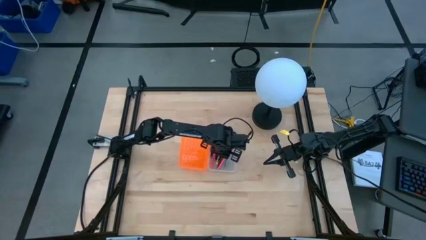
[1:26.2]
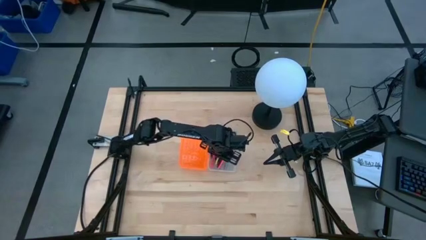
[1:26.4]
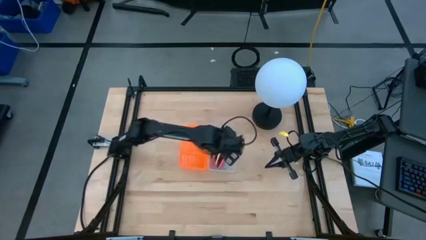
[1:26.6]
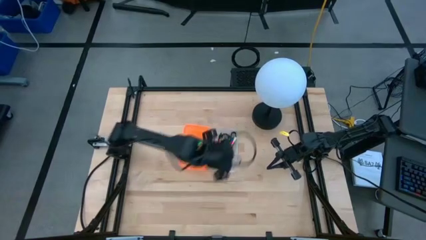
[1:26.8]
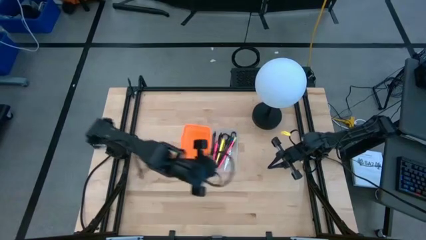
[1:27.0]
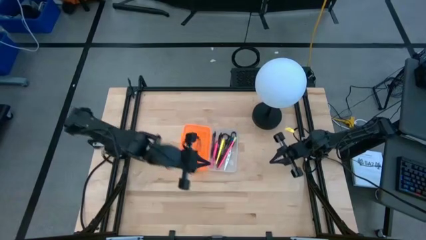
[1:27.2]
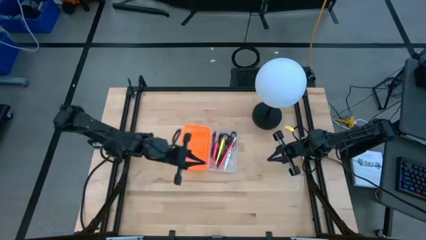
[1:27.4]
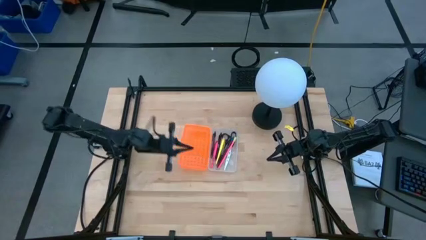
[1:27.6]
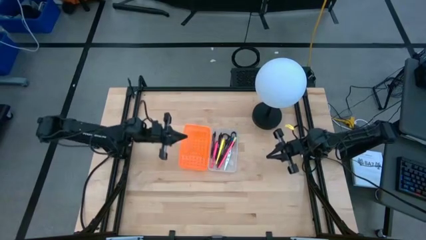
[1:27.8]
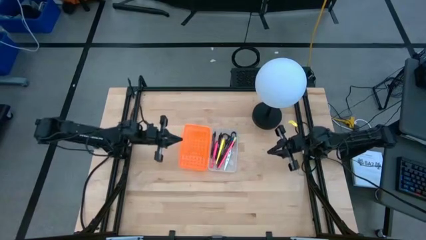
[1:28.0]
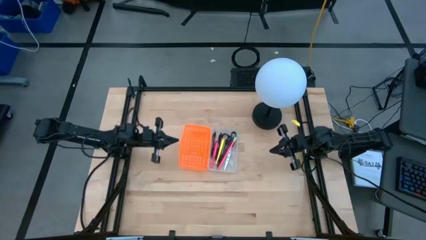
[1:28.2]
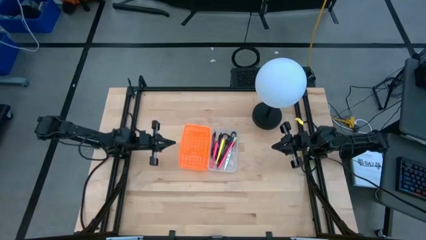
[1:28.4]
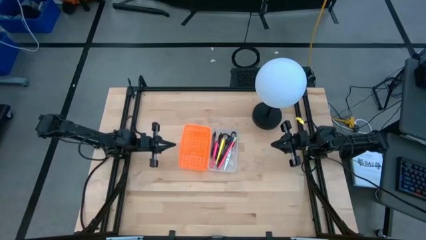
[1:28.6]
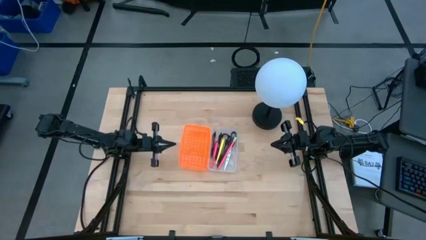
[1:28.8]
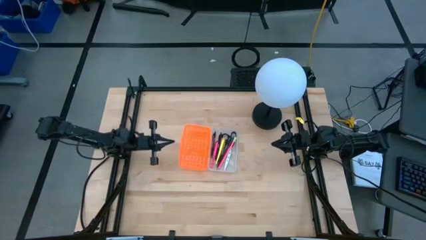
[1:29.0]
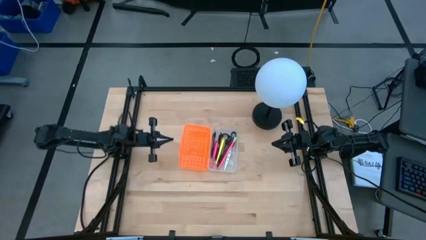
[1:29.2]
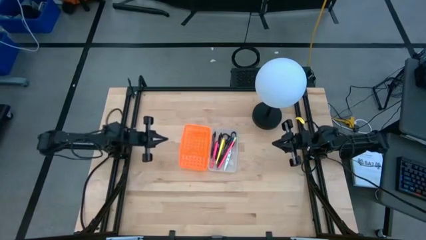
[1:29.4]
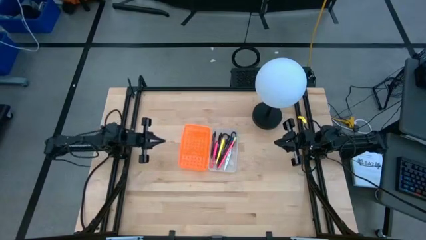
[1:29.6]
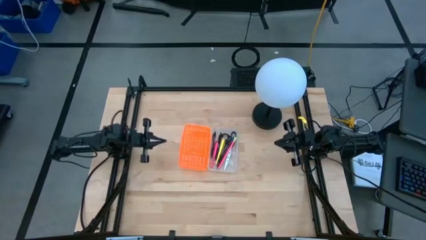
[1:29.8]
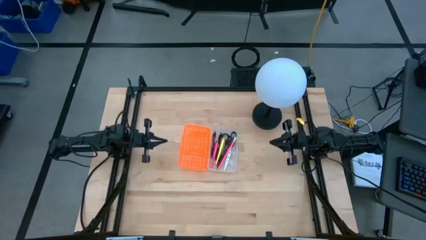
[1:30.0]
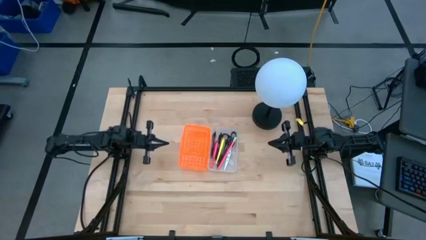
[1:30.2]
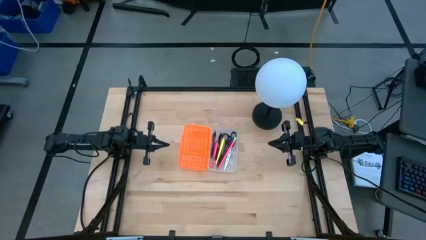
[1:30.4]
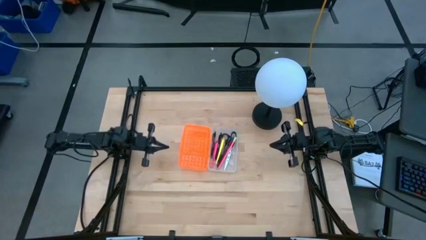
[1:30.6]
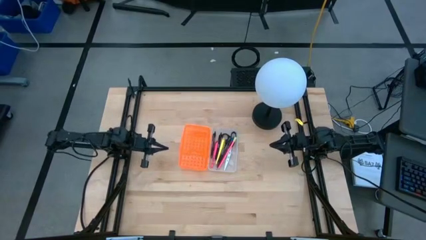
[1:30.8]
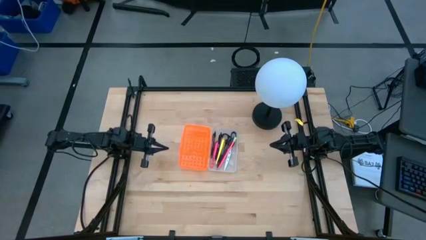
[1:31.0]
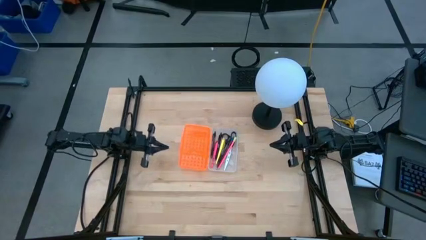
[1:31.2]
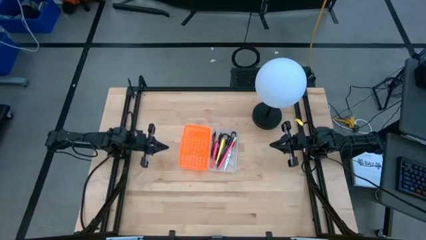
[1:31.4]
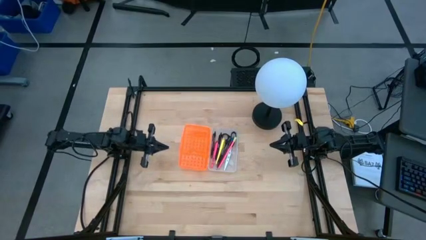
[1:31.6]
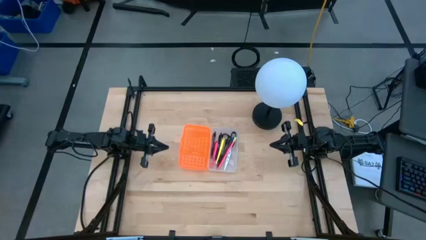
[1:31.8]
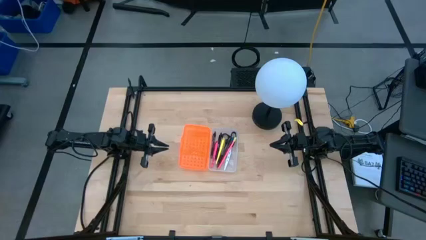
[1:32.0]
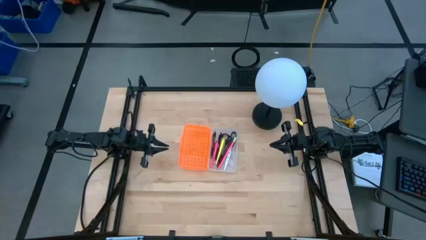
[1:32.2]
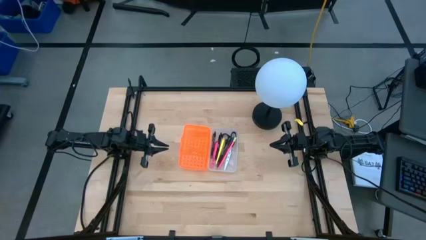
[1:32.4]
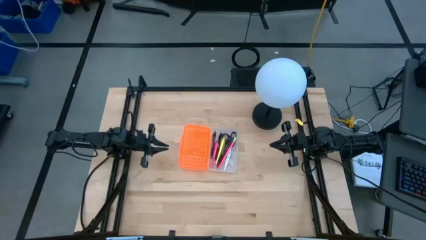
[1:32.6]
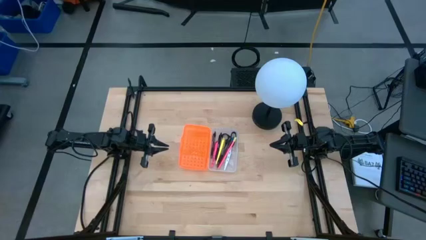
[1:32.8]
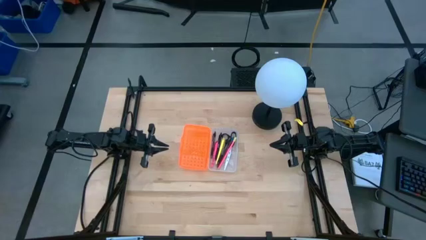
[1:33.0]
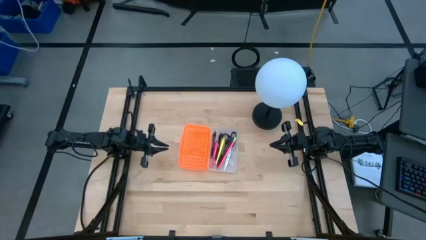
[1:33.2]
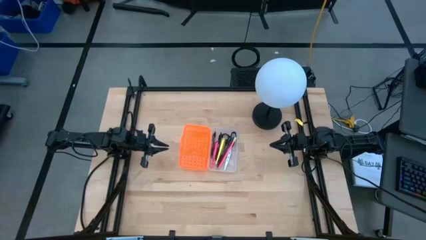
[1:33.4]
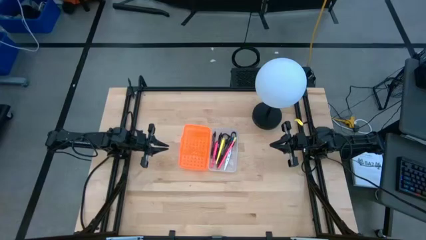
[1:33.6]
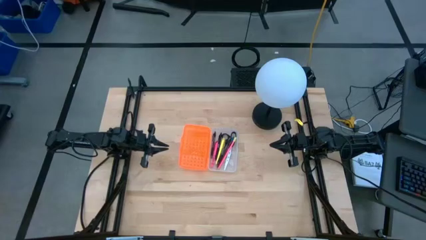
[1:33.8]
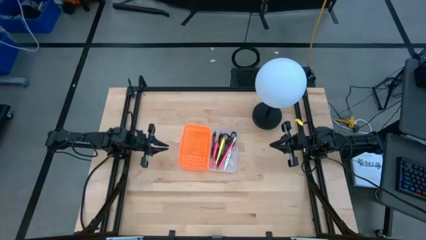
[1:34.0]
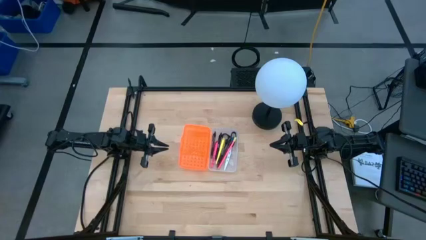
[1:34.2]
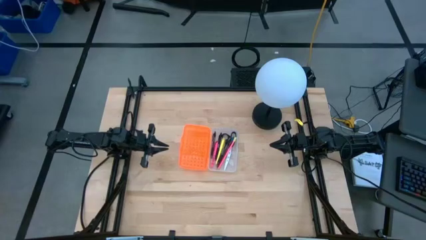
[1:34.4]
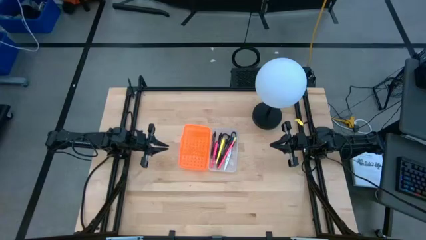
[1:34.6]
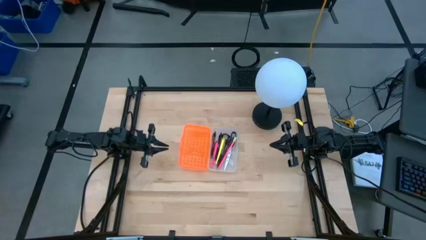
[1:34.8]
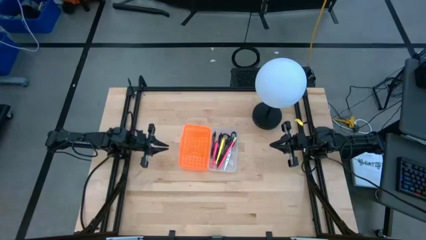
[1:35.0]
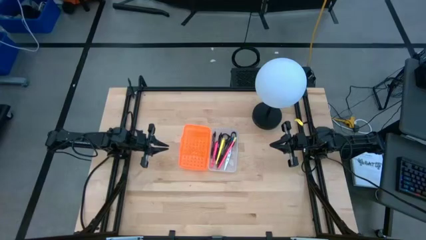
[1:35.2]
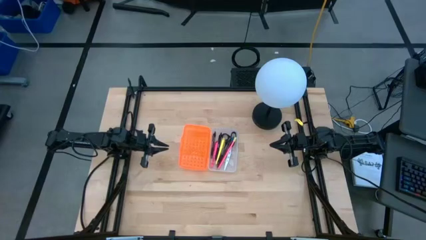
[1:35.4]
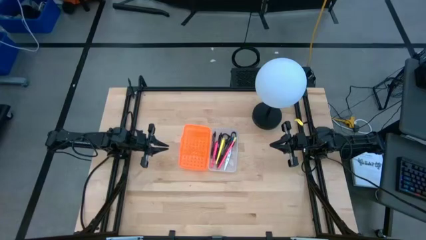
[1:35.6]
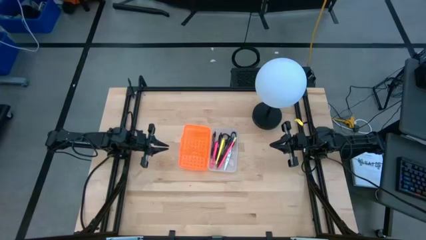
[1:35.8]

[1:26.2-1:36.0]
Task: Pick & place school supplies into a supply box
Return to Home Position

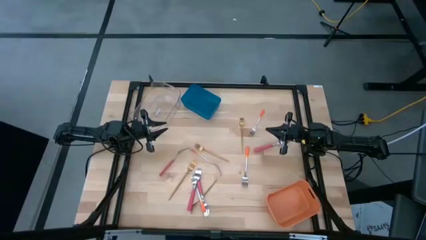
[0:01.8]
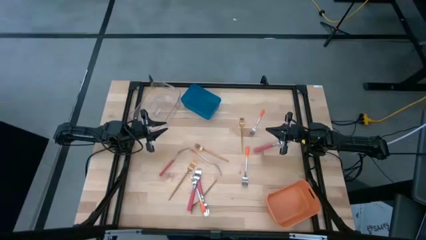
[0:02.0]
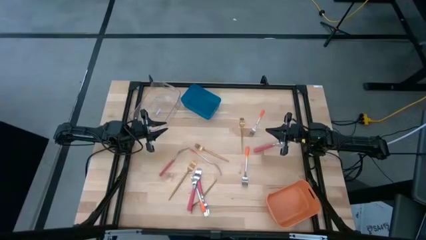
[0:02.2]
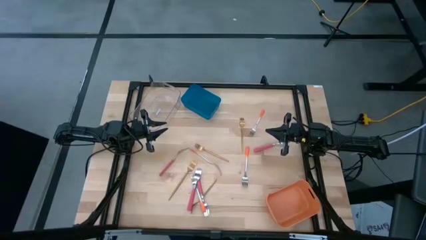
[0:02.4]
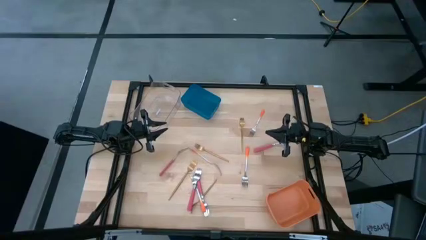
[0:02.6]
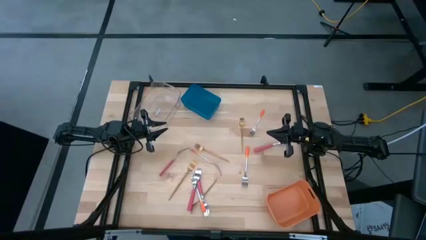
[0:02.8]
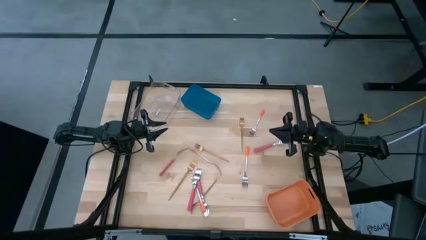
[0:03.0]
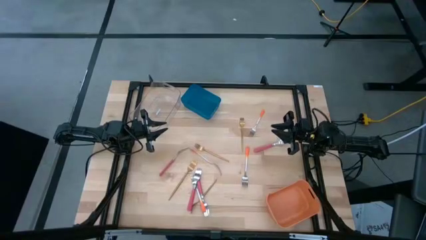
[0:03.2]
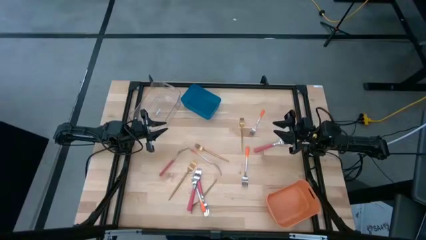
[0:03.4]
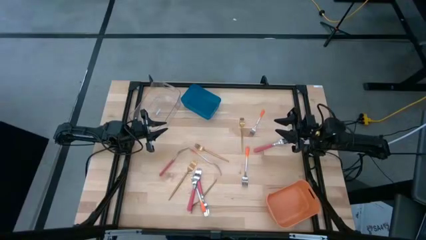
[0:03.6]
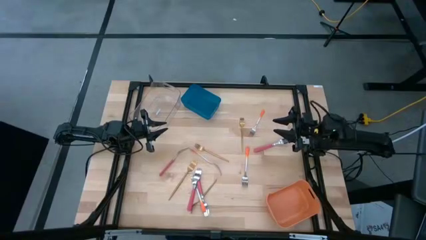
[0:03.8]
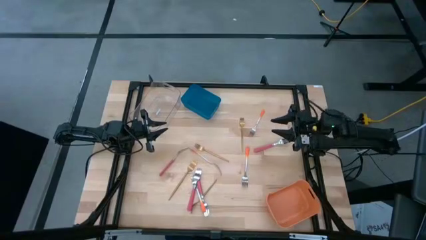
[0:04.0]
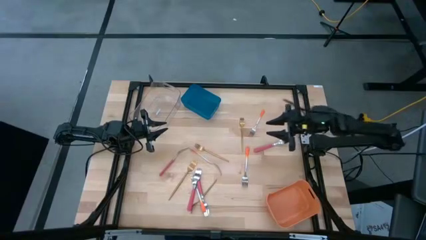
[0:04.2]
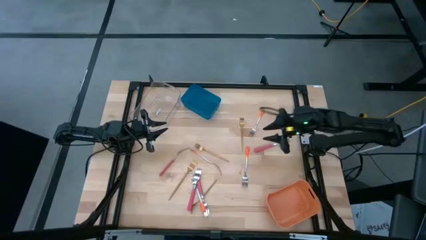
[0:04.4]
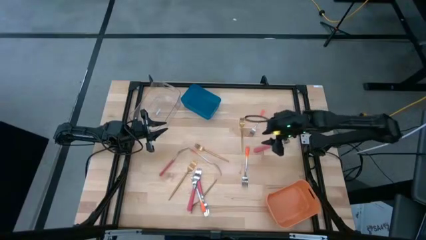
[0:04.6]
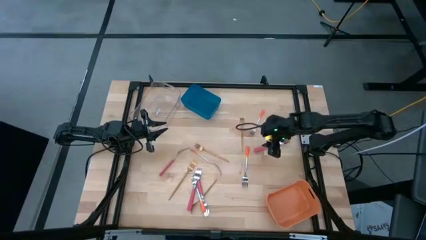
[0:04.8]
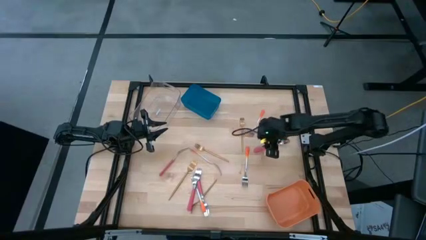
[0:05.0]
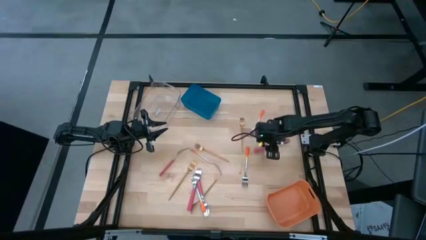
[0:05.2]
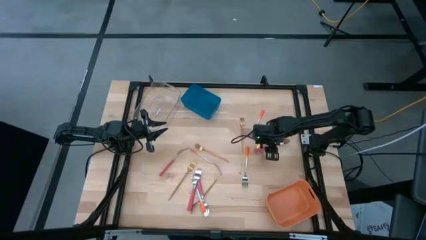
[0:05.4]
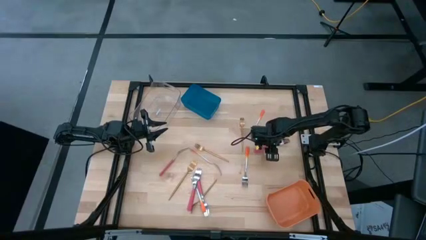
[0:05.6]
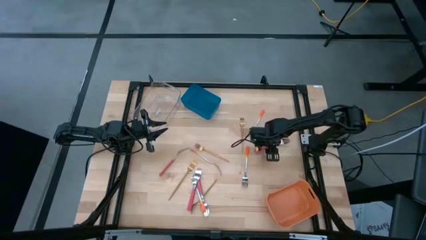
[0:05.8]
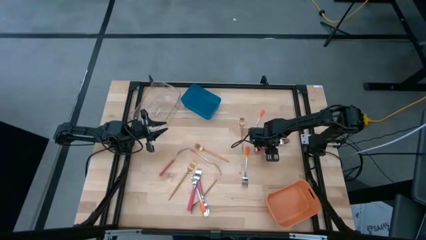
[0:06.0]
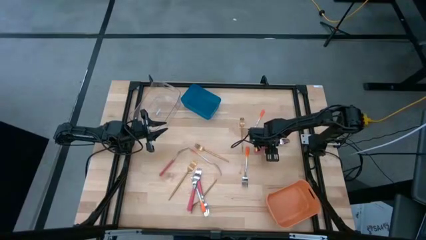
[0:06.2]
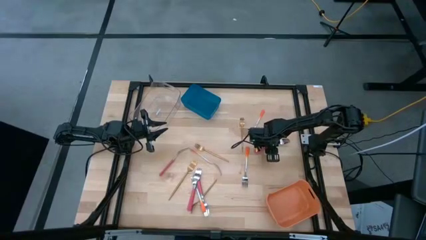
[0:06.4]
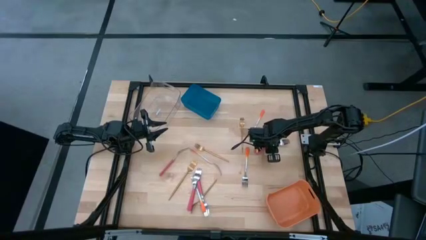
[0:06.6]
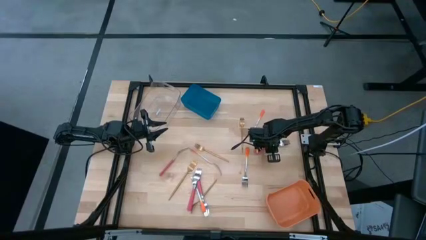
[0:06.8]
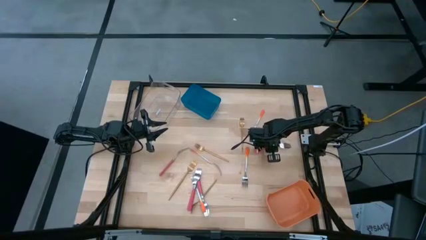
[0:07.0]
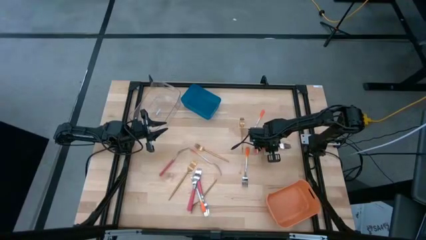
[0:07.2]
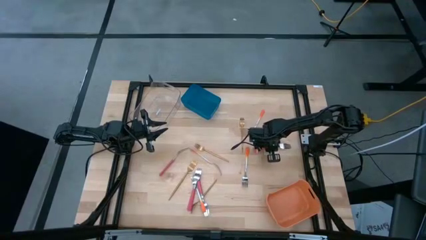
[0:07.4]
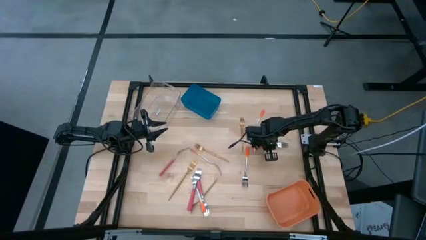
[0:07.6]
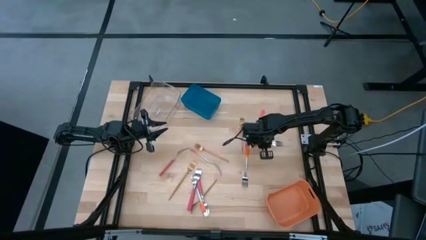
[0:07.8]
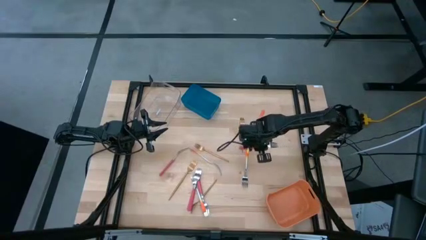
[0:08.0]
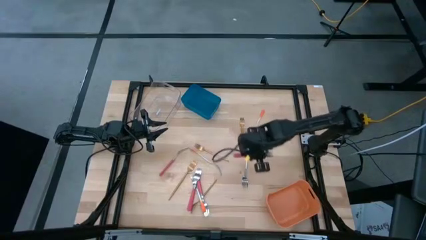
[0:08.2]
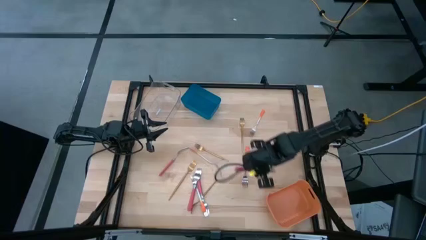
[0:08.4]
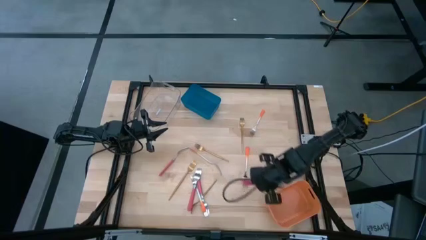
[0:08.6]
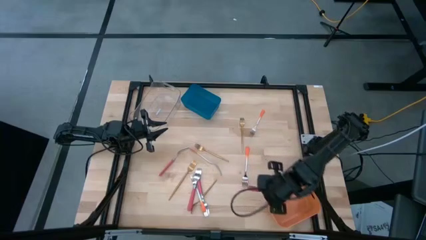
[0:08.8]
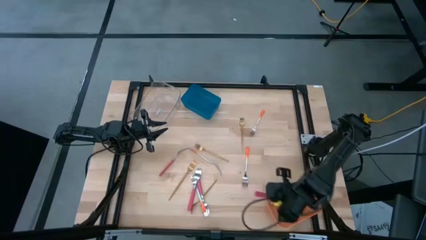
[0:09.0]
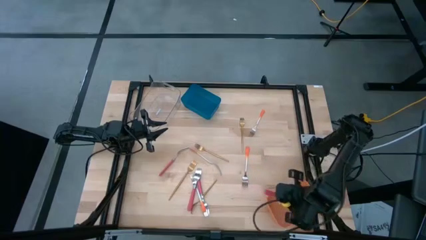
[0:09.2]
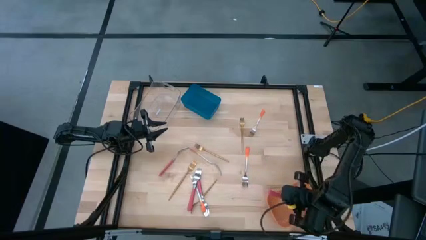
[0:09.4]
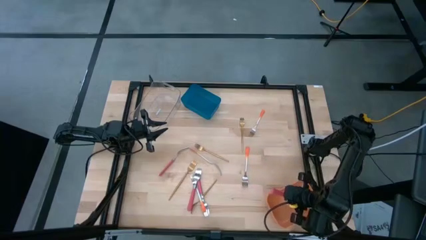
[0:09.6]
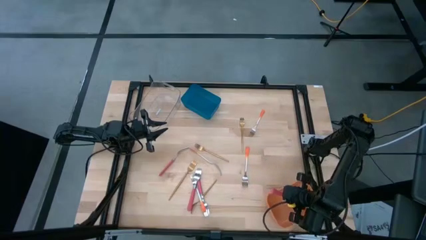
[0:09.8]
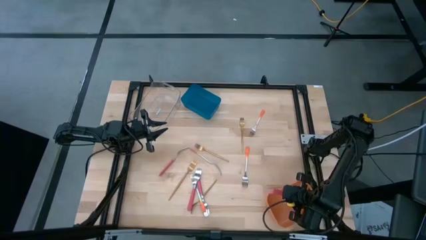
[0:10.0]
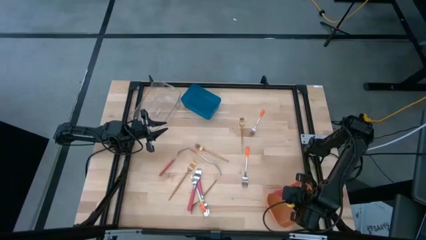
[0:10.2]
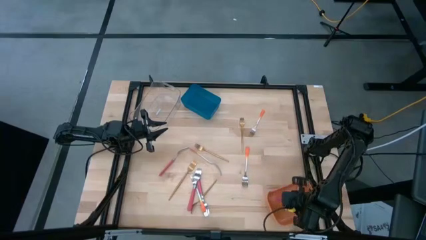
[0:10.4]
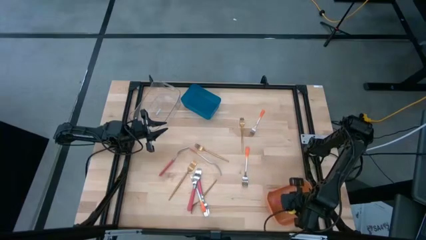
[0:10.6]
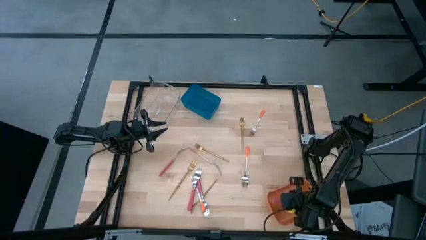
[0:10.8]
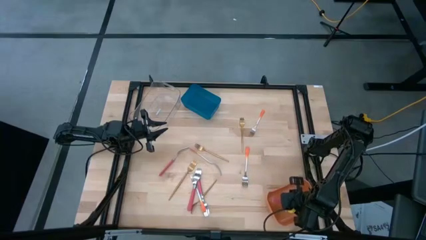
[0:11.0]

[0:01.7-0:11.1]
Task: Sort silverware by color (type)
Put the pink fork into the orange bin
